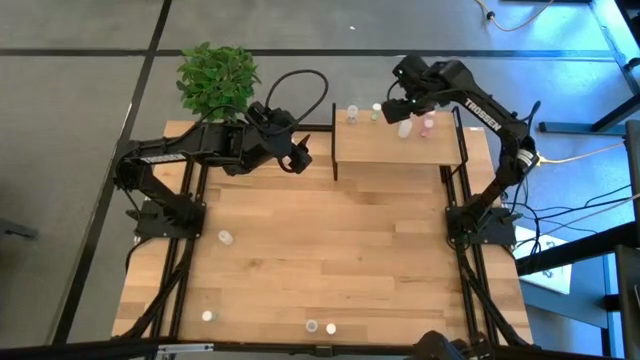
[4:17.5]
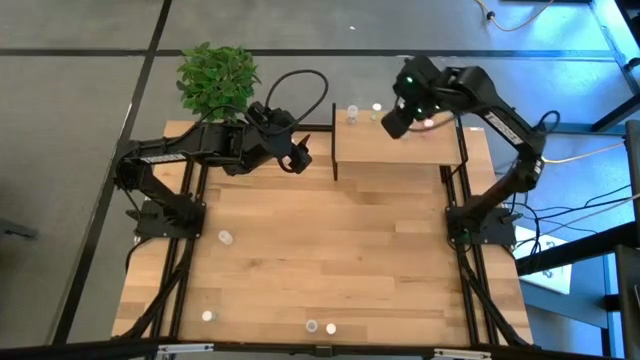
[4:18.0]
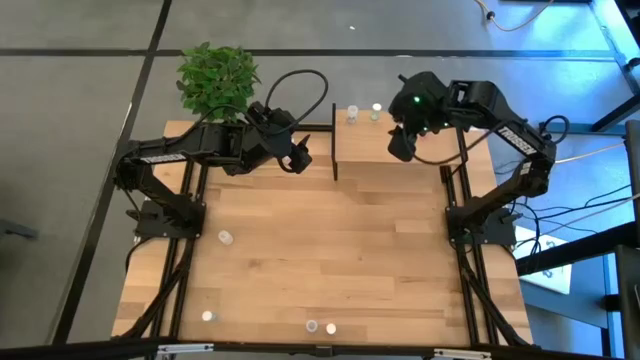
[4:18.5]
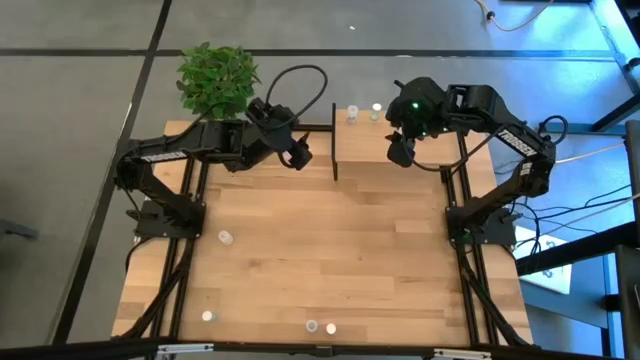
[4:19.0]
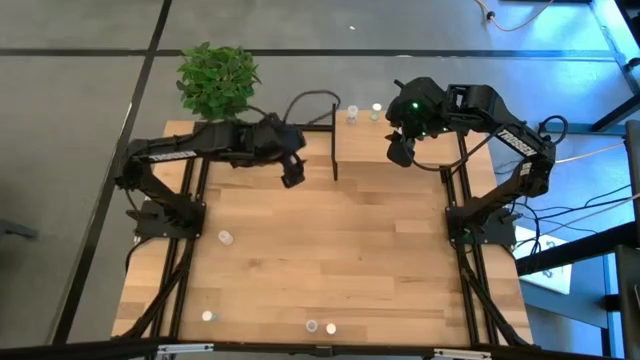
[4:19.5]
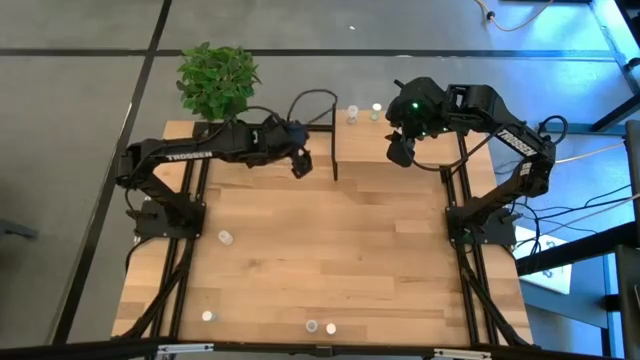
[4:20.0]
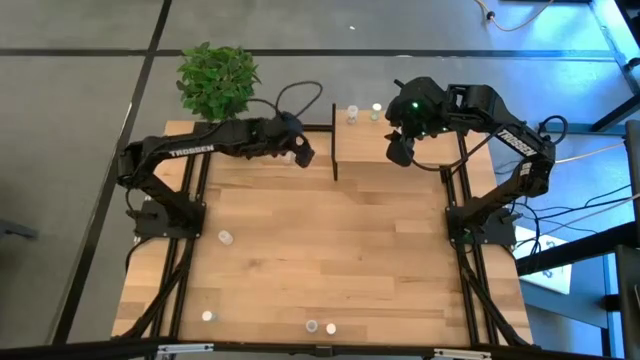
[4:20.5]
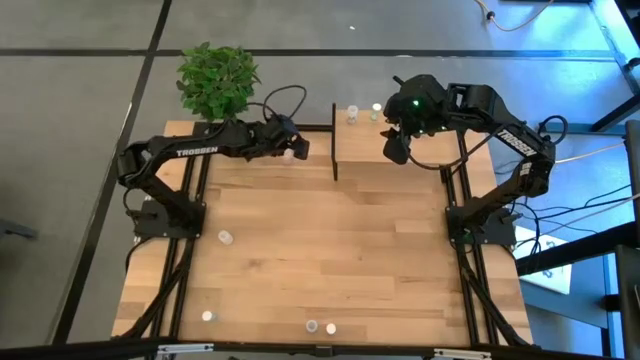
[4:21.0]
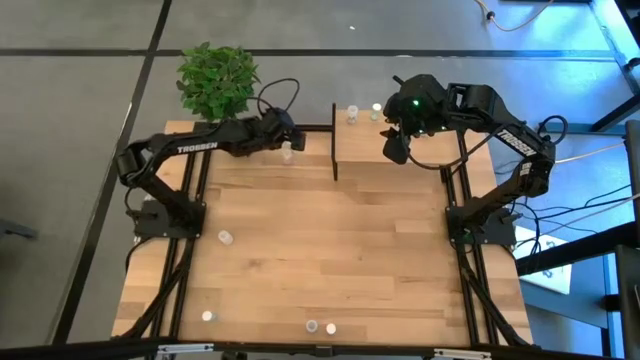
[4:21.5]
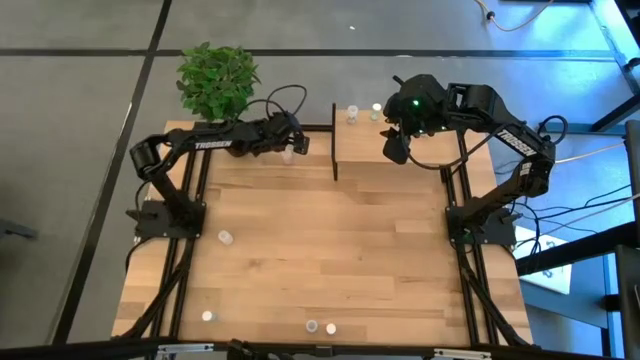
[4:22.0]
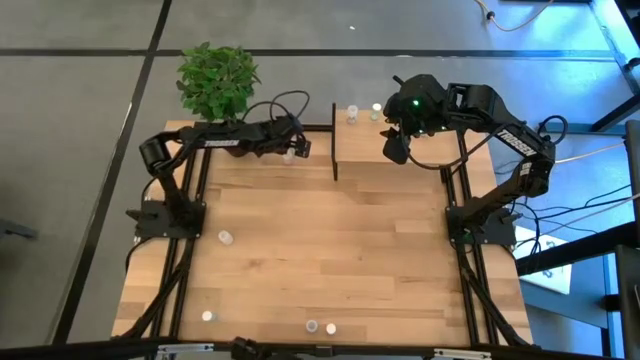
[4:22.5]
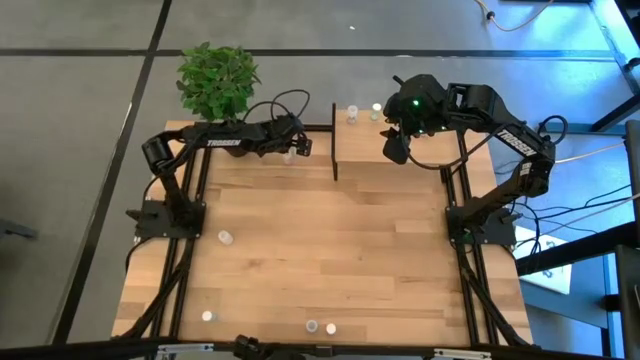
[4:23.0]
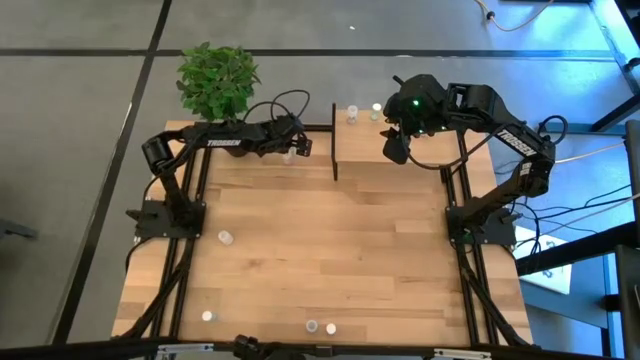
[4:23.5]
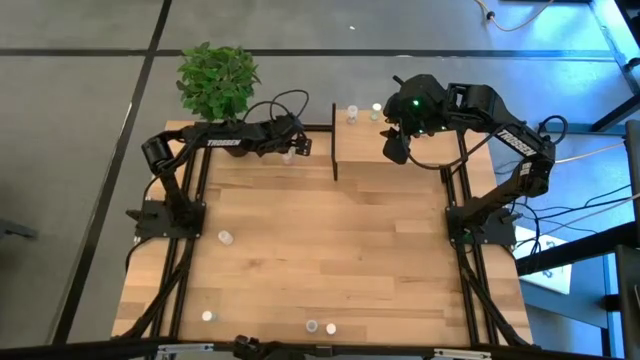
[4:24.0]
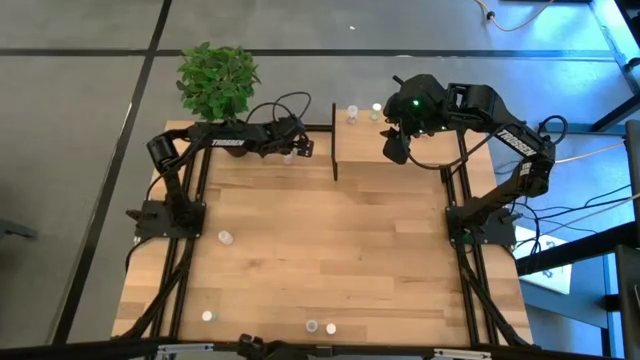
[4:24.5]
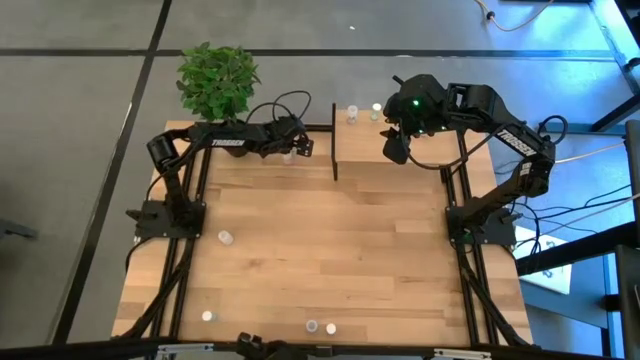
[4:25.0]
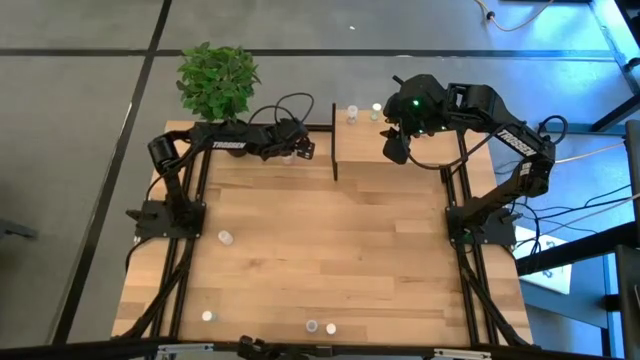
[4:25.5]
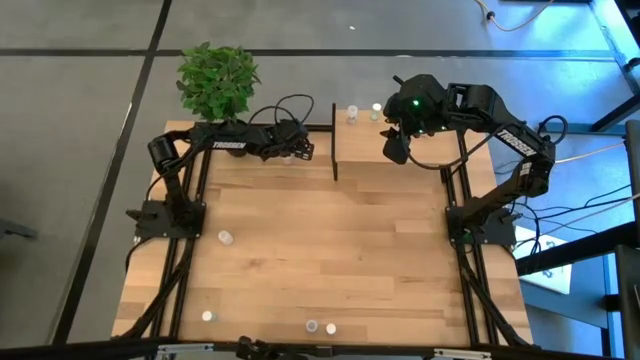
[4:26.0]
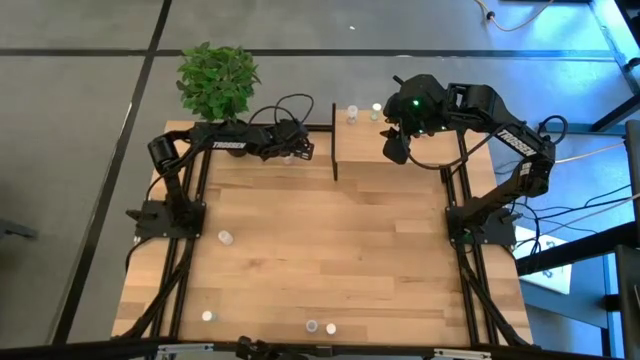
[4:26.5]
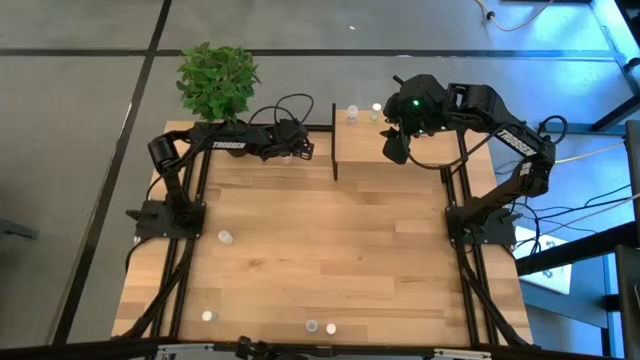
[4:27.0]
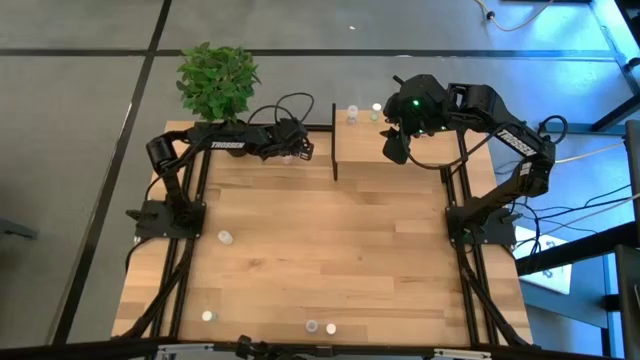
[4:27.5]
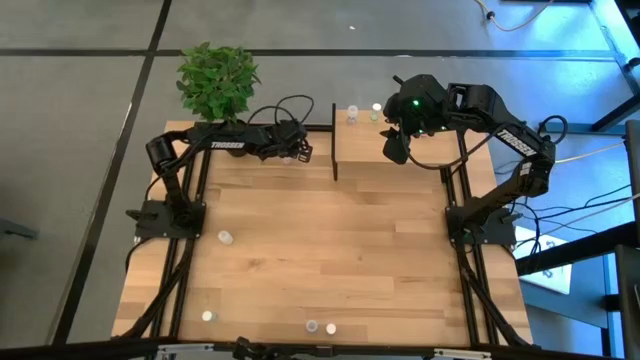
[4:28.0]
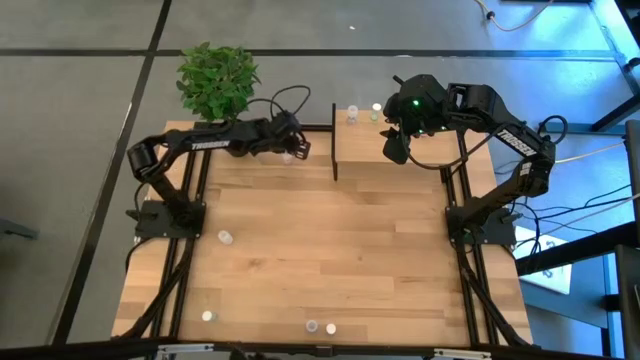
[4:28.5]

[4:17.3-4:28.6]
Task: Pick and place medicine bottles onto shelf by color
Put the top green pill bottle aligned with the other green pill bottle on the shelf
